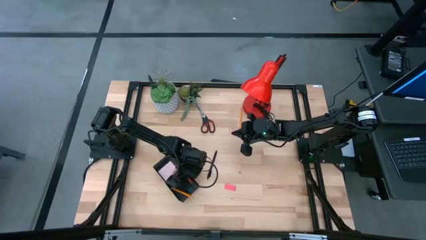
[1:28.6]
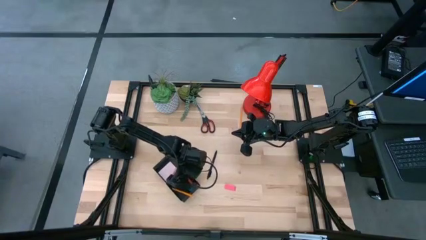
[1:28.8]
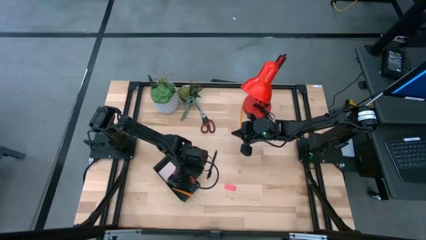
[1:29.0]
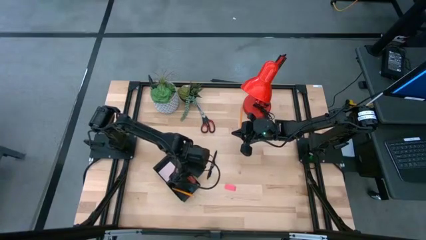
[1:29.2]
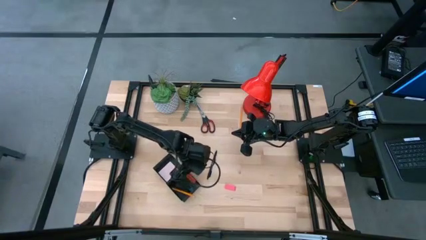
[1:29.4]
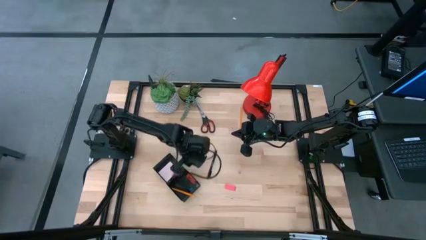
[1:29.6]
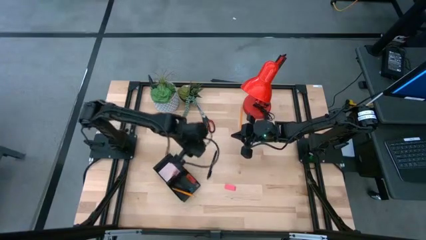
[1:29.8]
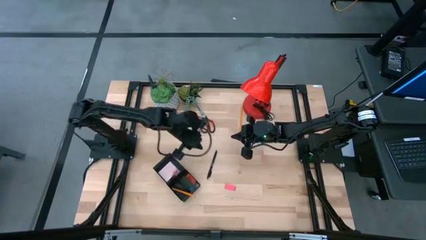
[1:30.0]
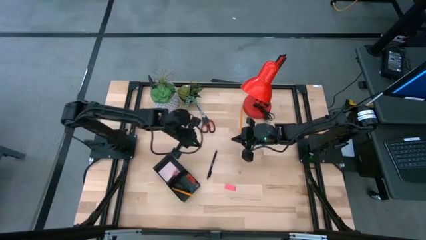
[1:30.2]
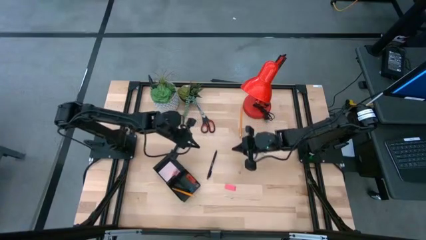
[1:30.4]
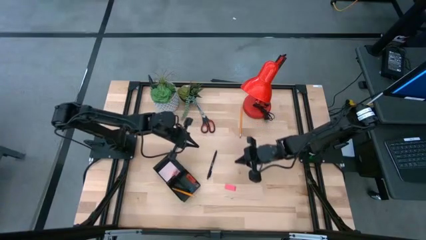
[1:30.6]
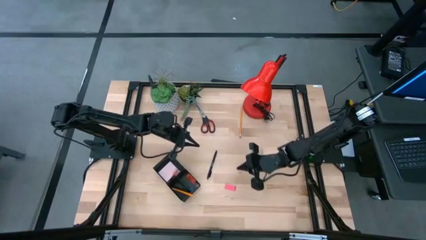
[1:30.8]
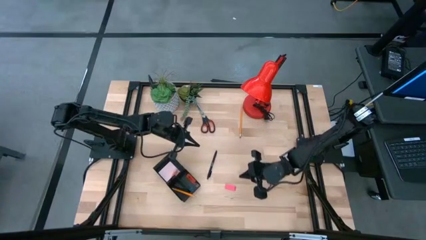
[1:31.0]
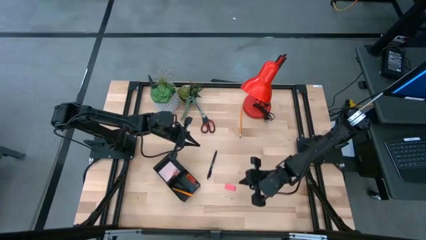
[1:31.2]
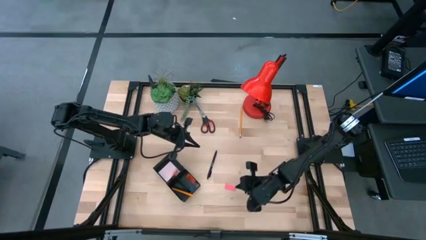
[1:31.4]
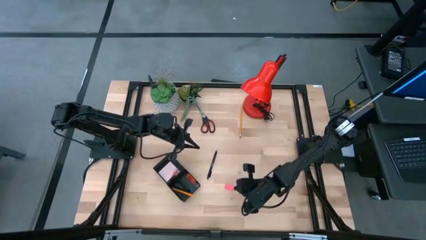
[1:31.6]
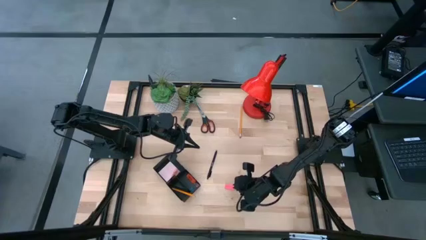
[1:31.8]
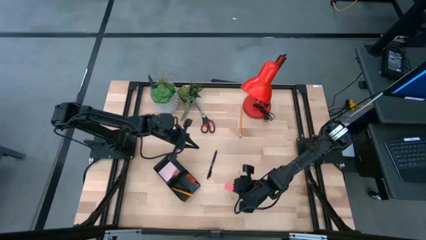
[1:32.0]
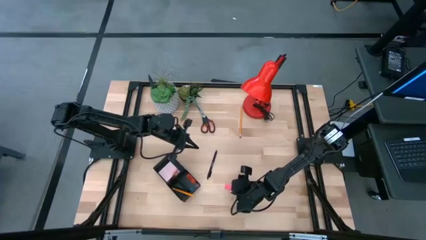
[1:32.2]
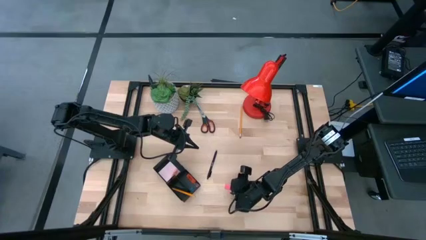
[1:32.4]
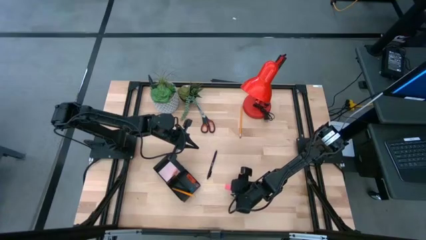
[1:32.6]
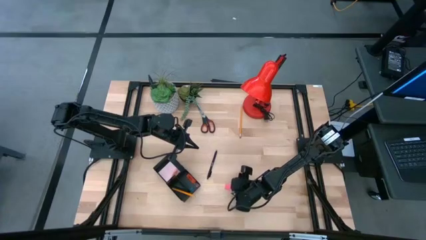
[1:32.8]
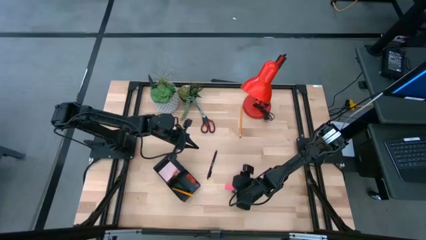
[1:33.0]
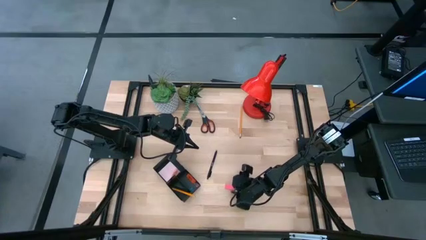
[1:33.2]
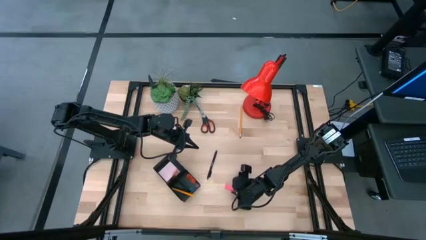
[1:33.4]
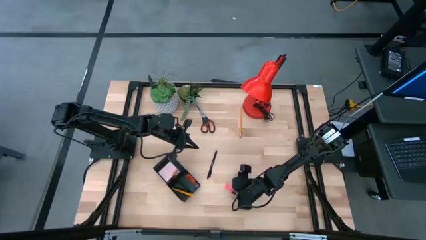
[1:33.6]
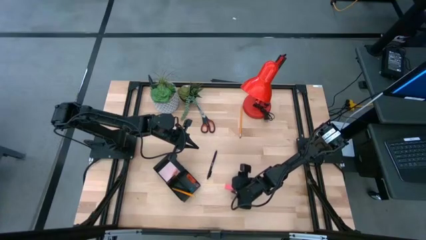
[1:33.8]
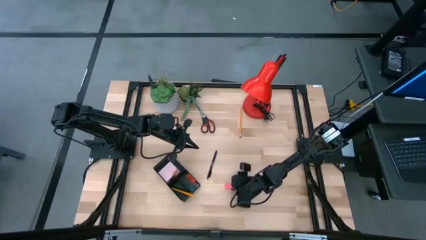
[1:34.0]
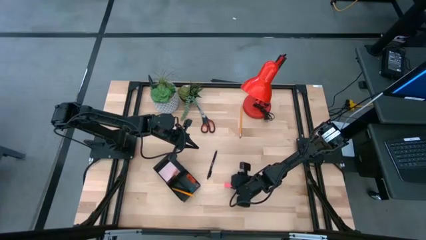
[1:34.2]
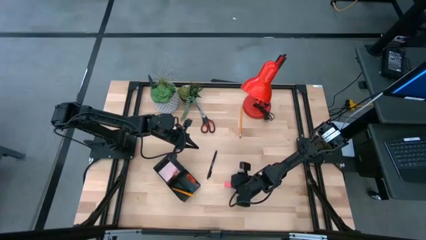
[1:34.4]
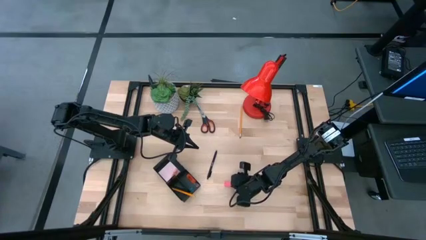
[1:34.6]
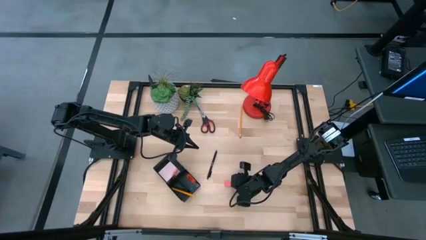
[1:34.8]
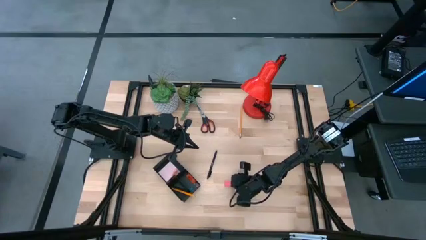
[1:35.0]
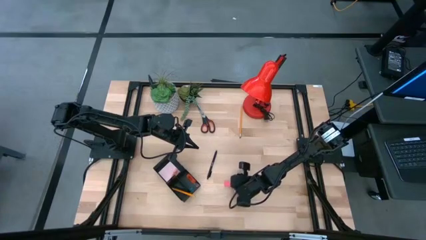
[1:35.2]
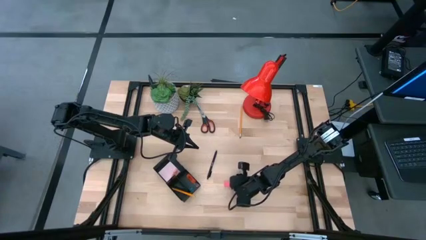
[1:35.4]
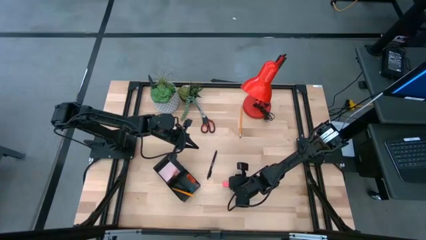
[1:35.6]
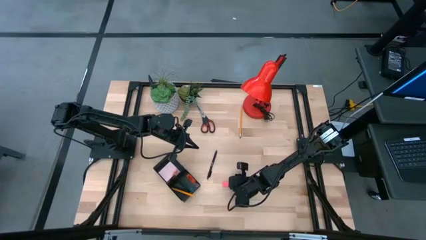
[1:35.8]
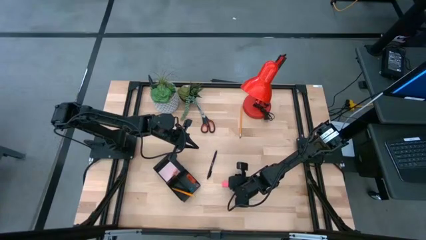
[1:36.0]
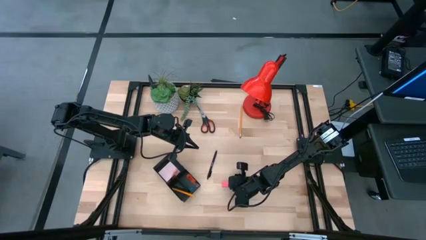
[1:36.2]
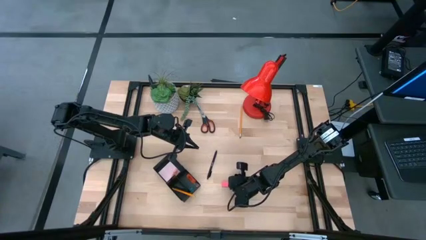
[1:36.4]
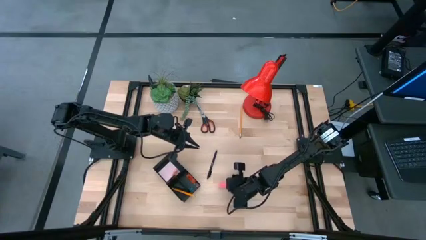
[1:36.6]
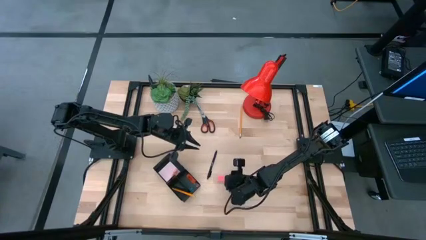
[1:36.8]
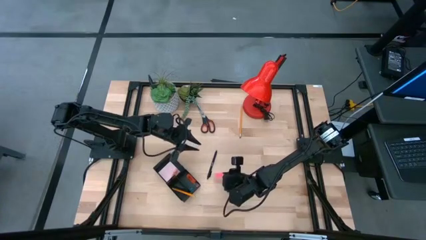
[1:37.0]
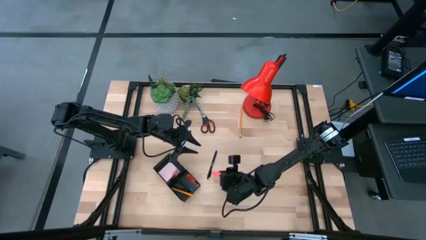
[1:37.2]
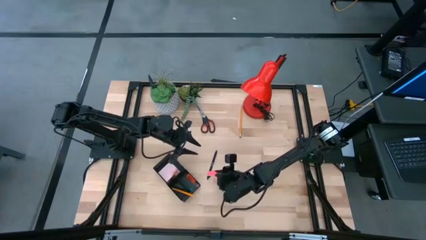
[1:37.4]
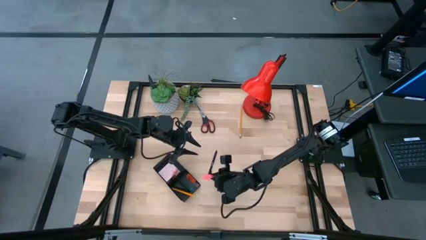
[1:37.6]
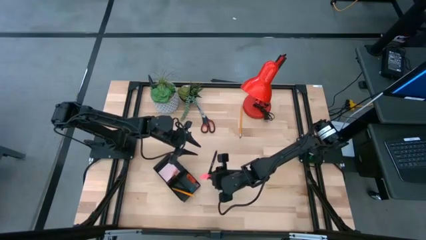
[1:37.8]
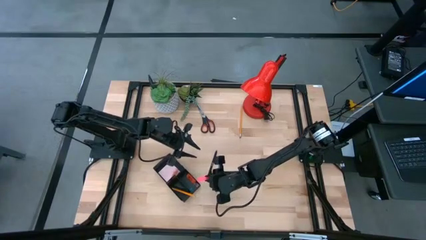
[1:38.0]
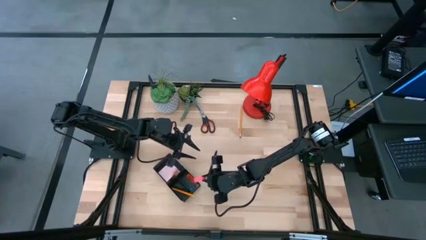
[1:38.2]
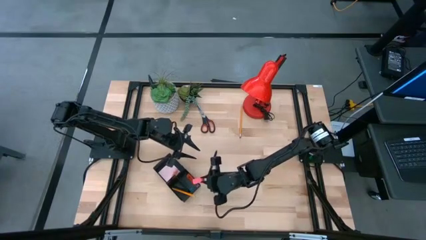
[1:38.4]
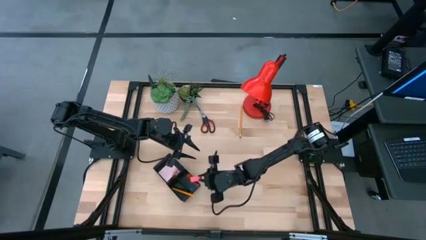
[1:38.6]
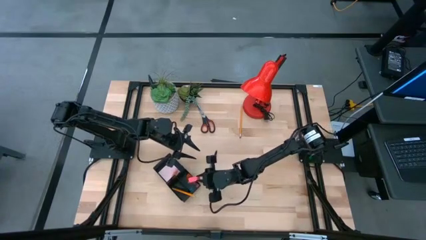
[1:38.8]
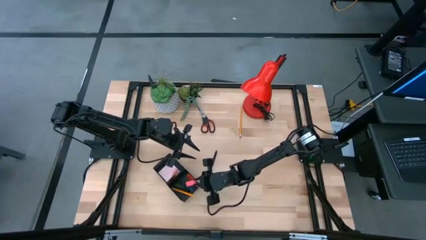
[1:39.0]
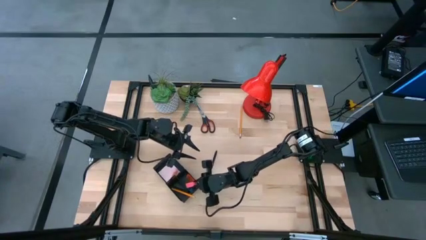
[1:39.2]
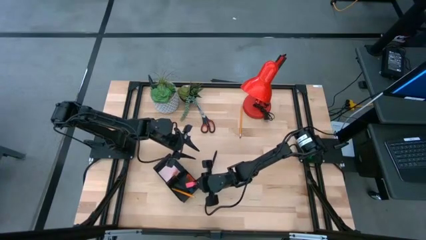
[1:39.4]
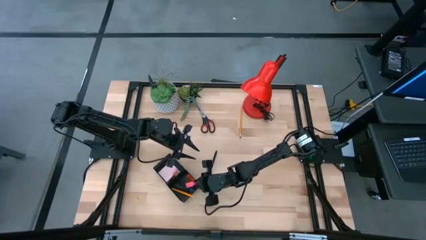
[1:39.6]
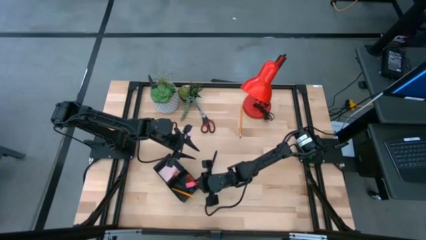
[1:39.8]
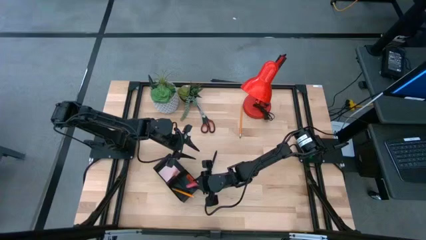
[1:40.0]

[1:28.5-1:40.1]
Task: Pick and place office supplies into organizer
Put the pink eraser into the black desk organizer

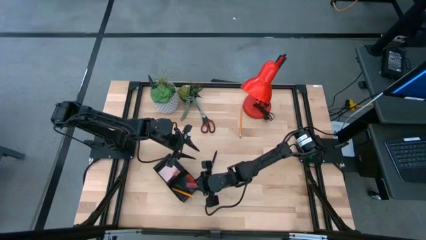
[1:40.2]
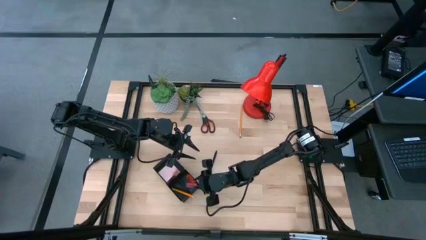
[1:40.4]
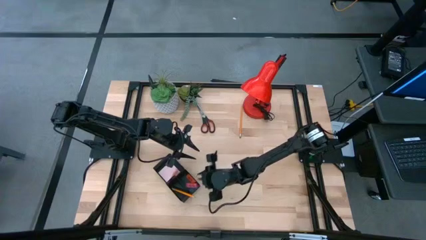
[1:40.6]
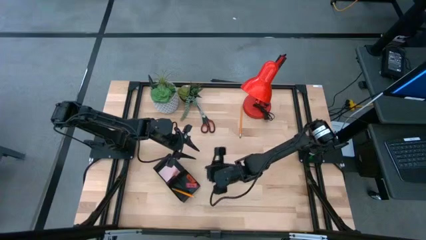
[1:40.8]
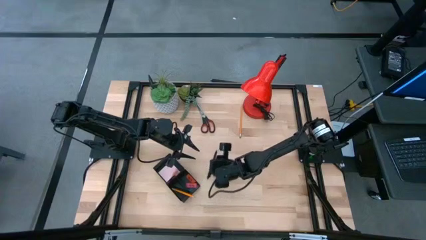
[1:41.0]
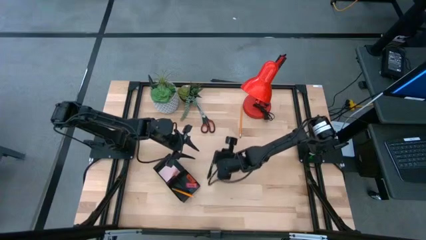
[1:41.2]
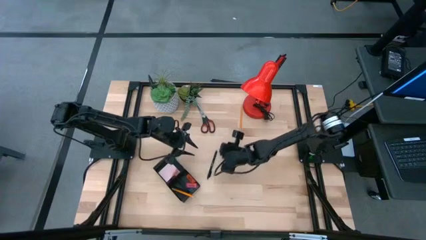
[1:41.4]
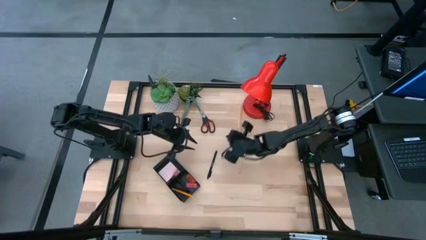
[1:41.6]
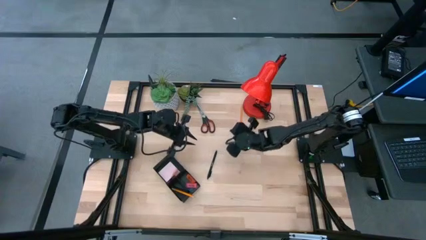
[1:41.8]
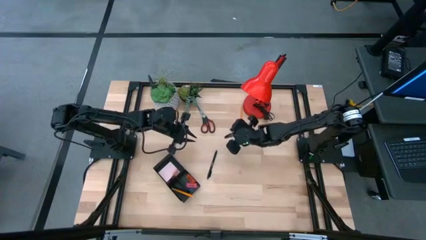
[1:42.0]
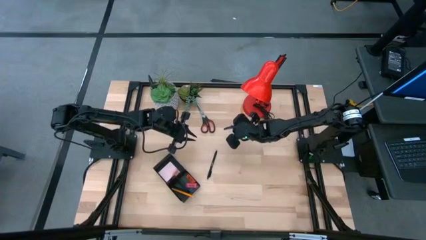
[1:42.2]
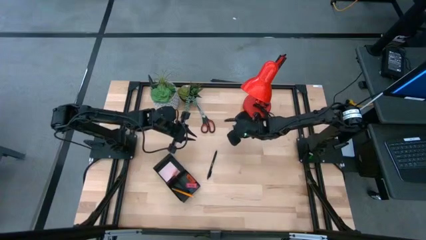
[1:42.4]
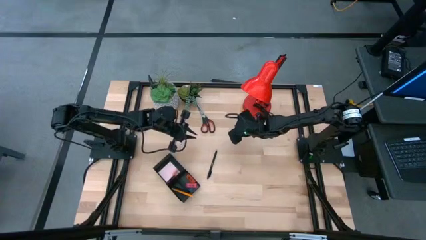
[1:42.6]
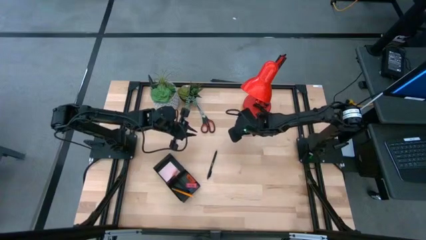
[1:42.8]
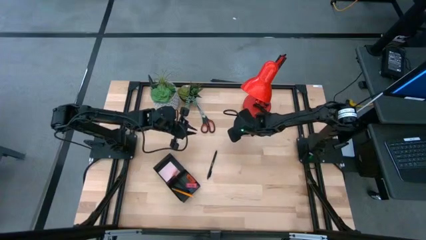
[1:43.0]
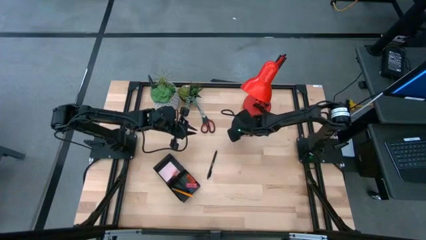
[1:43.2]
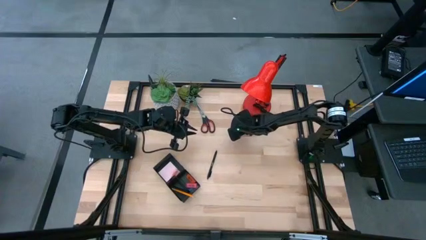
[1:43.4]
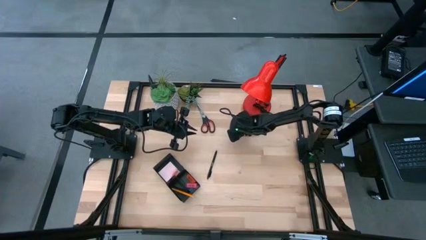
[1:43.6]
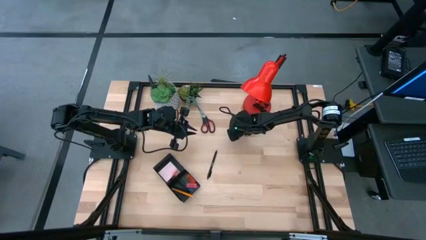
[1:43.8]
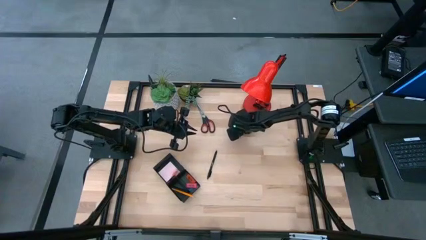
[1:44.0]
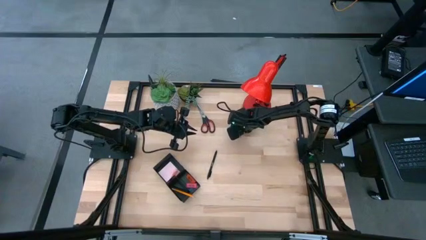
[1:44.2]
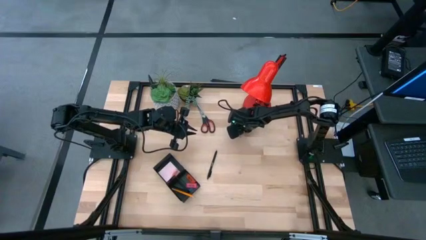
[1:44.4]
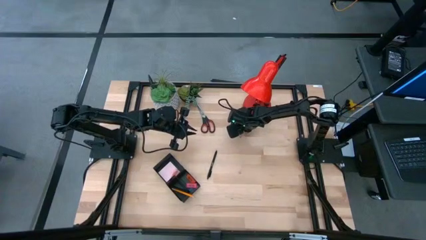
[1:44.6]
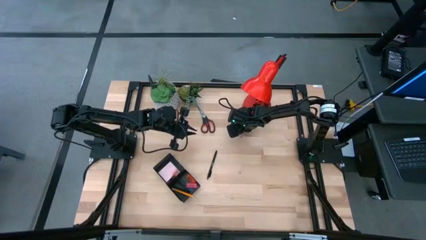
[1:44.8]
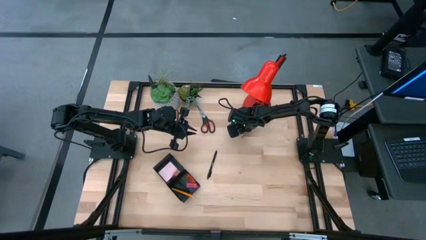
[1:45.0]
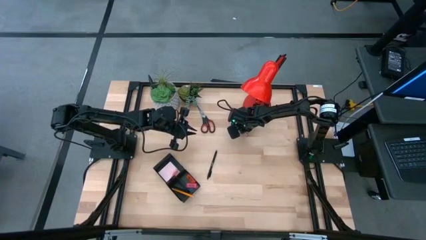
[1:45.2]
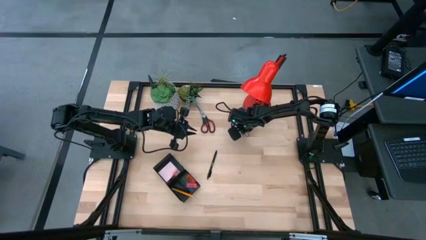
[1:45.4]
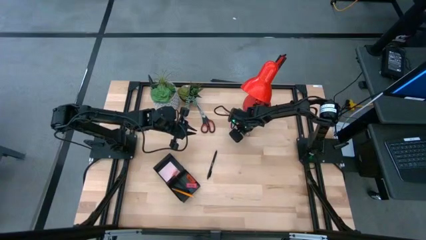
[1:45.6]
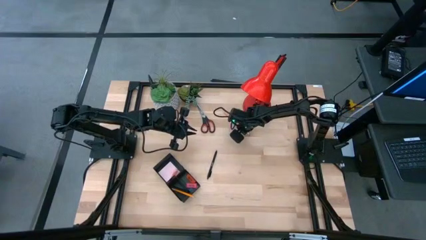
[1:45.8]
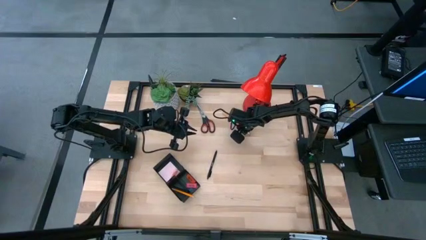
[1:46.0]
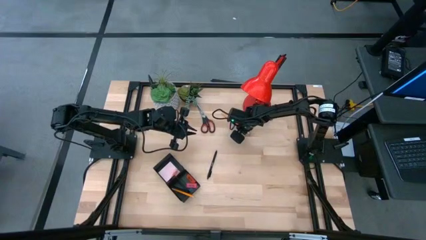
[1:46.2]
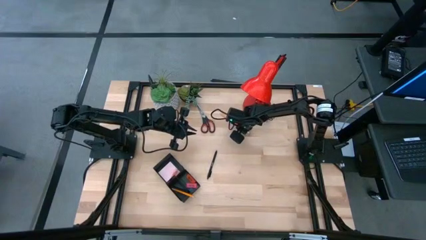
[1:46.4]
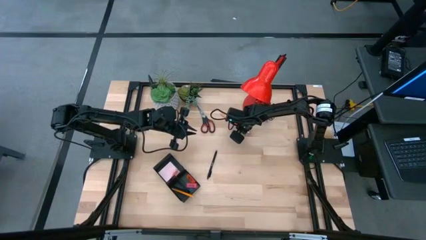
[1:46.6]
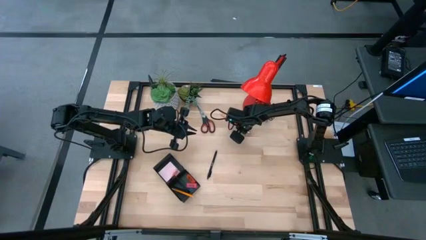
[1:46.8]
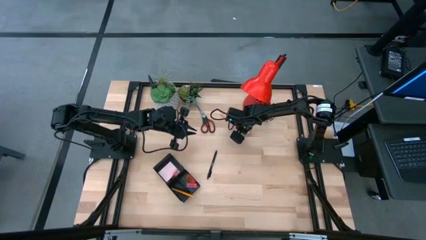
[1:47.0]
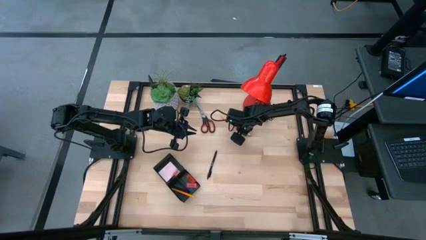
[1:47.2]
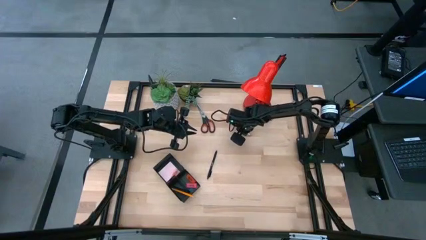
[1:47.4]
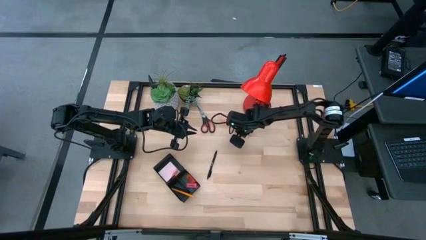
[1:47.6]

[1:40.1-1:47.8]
Put the yellow pencil into the black desk organizer
